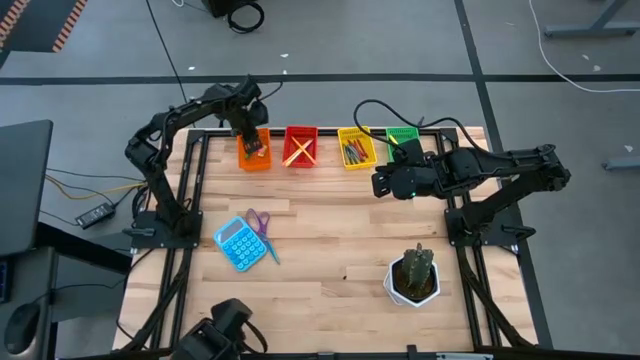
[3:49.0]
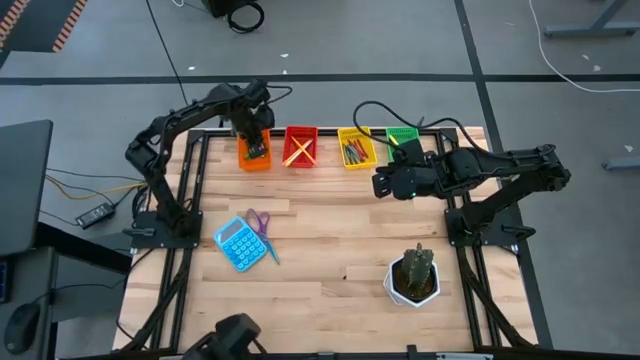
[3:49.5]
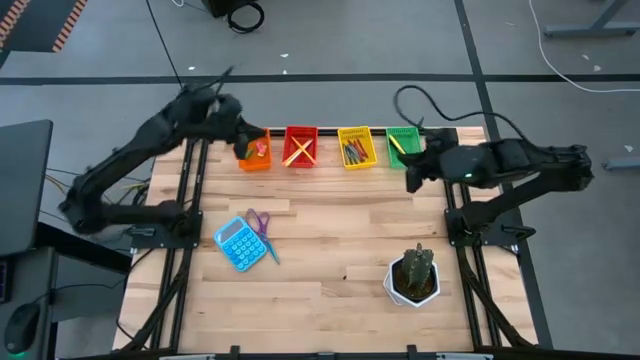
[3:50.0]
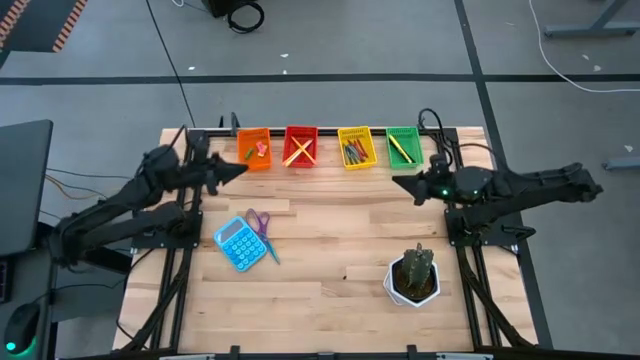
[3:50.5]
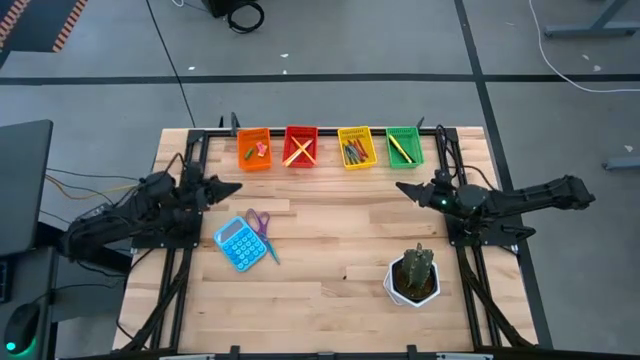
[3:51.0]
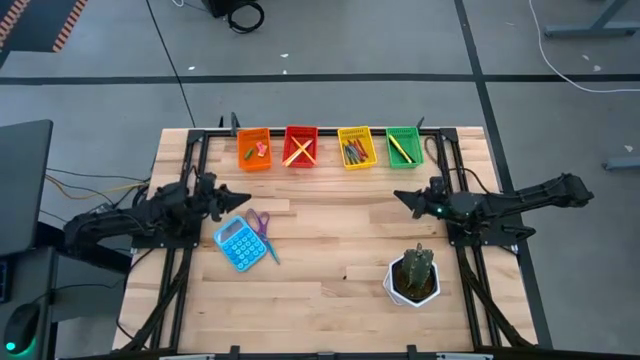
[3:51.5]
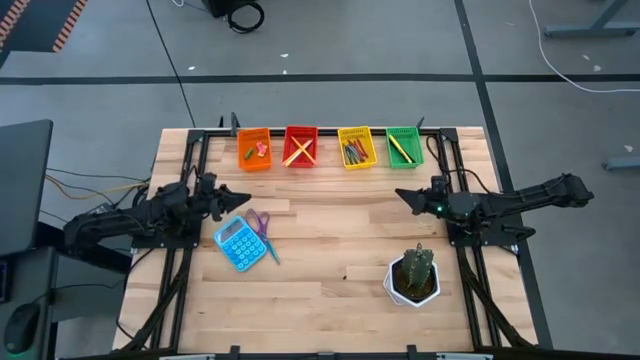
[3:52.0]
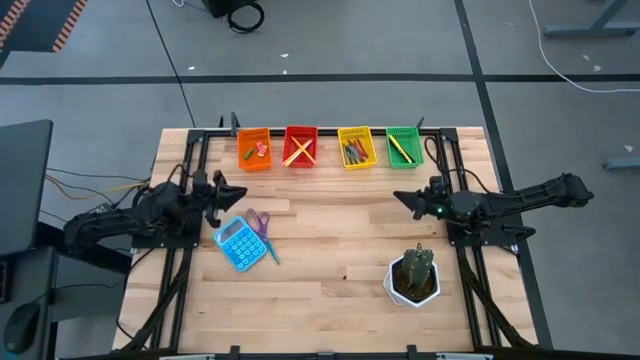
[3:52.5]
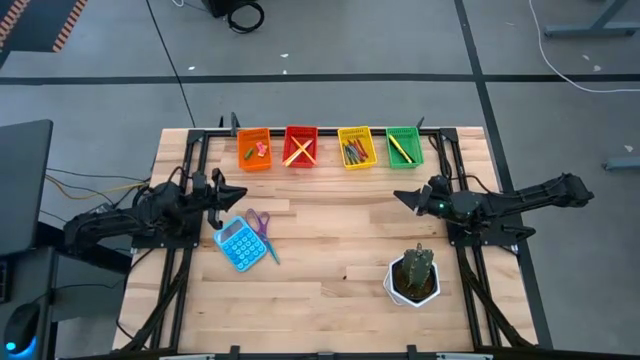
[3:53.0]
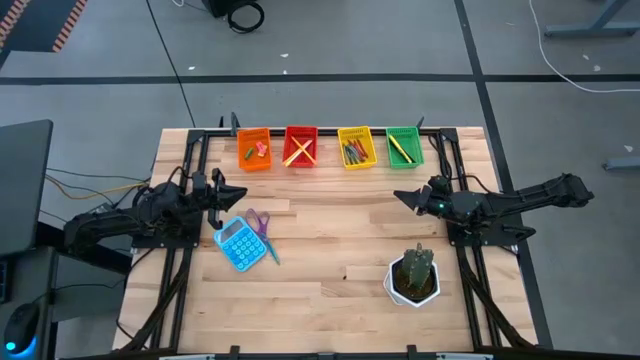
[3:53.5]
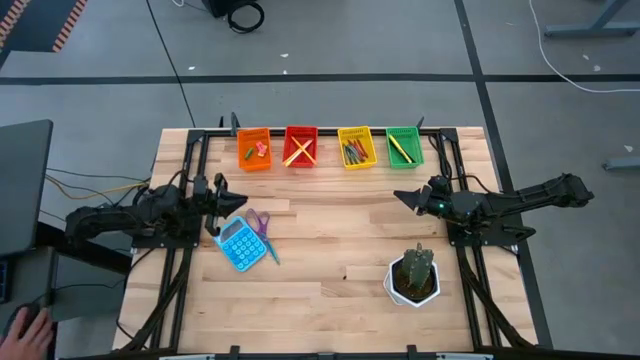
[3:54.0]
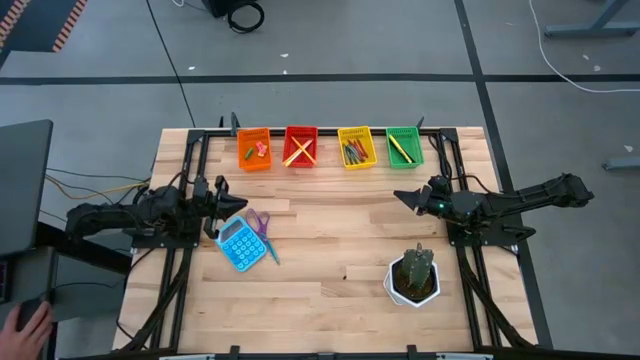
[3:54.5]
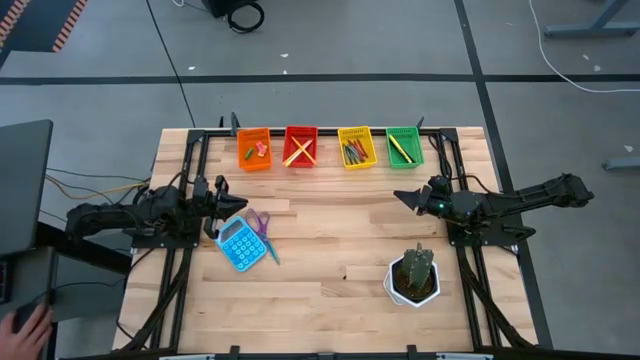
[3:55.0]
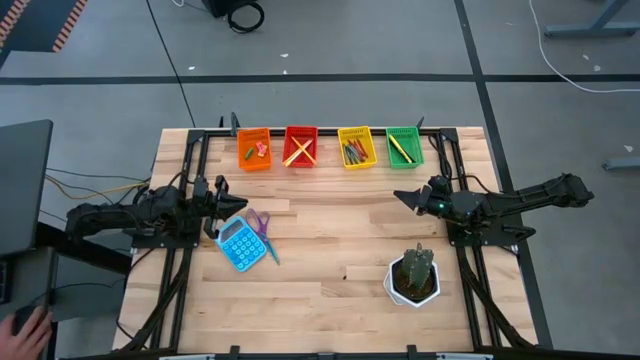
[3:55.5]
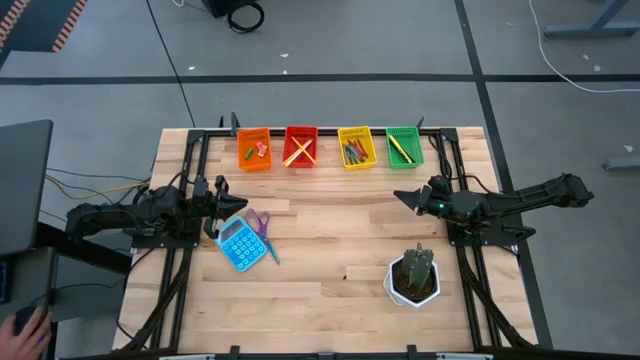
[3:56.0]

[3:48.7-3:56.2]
Task: Sort crayons/erasers/pens/pencils in bins
Return to Home Position

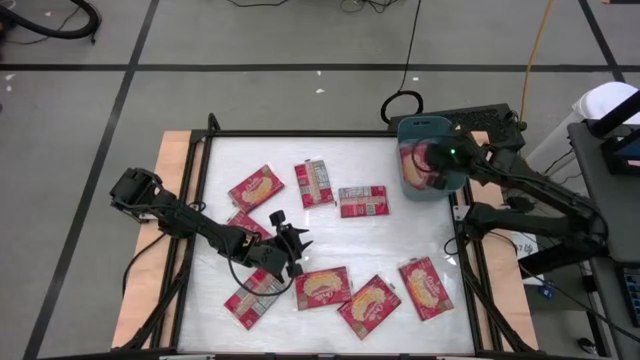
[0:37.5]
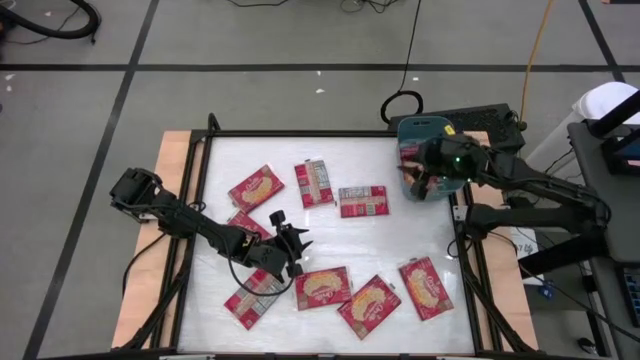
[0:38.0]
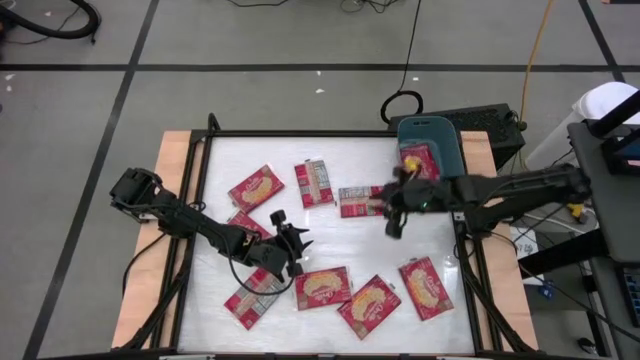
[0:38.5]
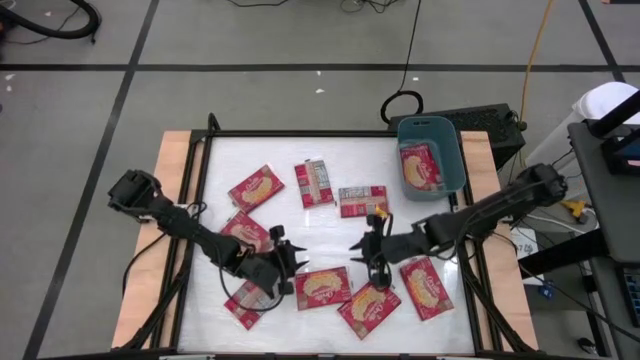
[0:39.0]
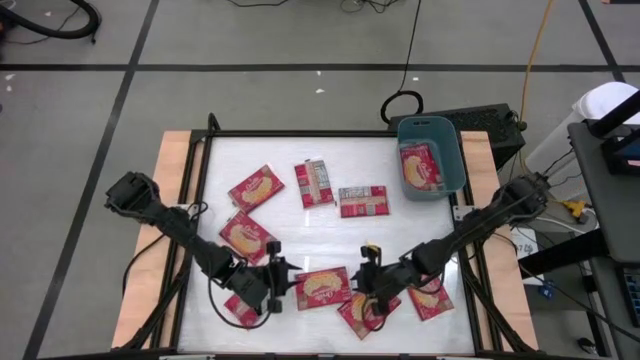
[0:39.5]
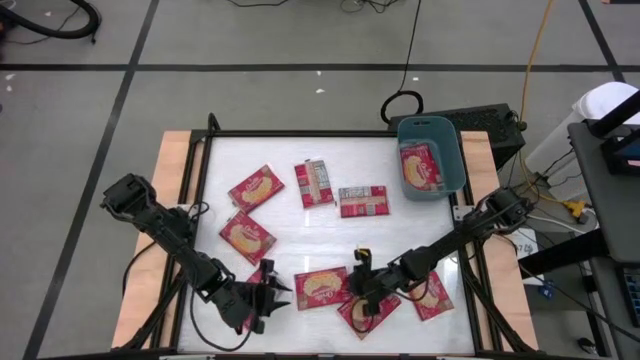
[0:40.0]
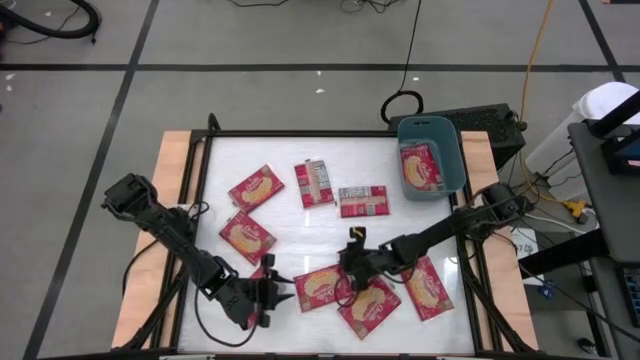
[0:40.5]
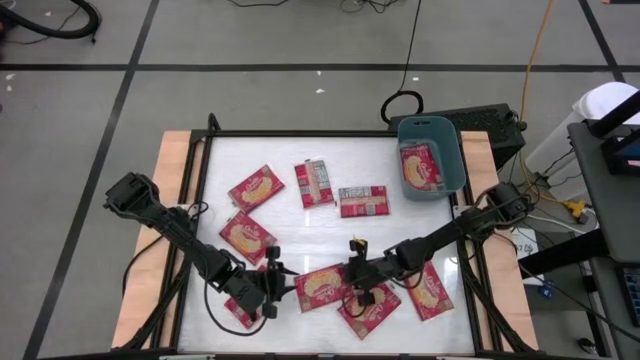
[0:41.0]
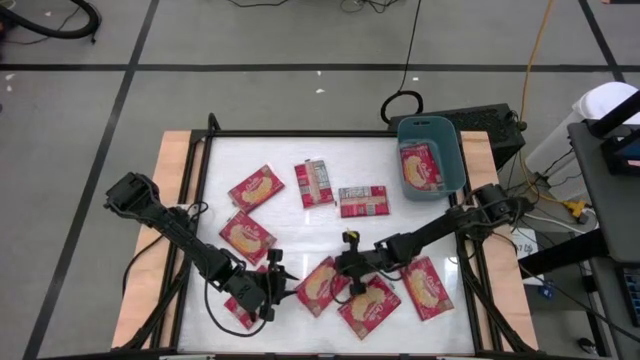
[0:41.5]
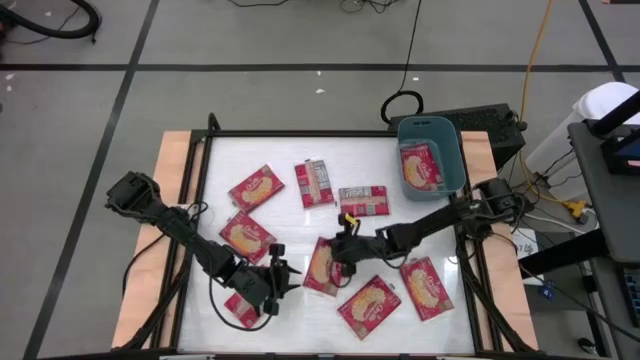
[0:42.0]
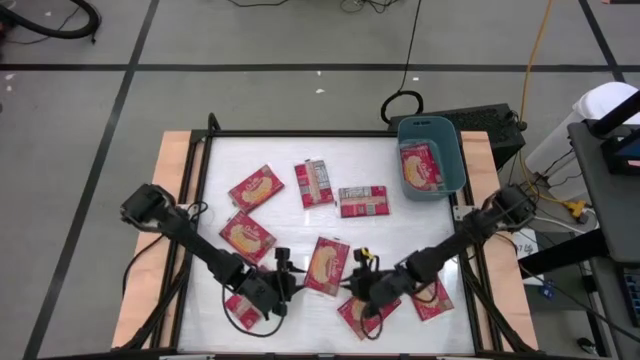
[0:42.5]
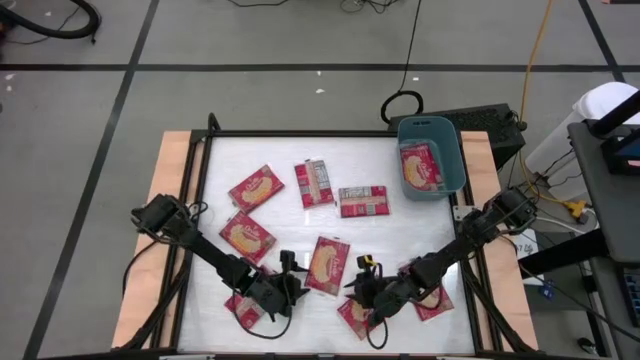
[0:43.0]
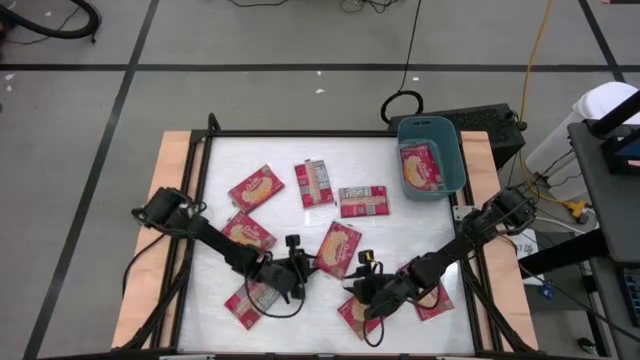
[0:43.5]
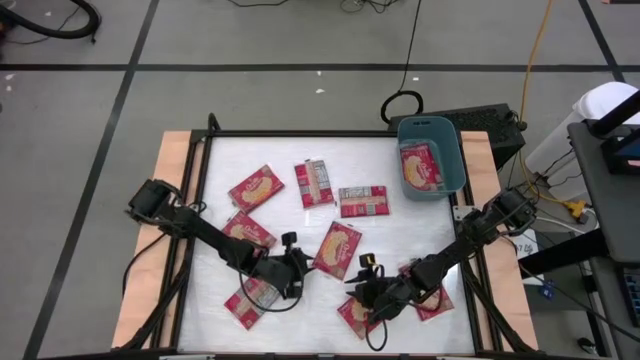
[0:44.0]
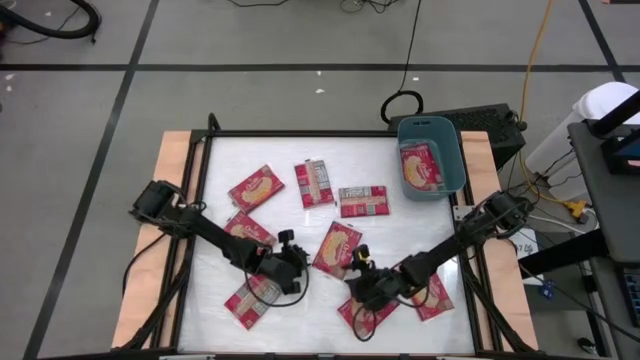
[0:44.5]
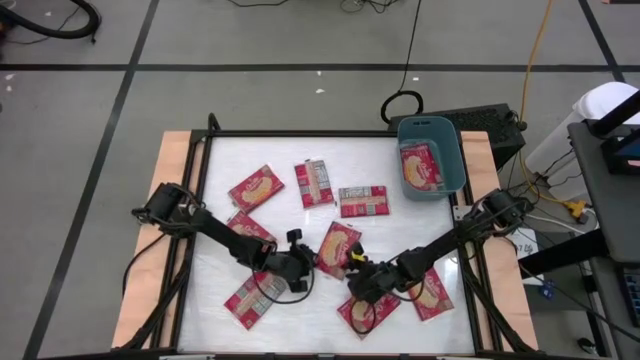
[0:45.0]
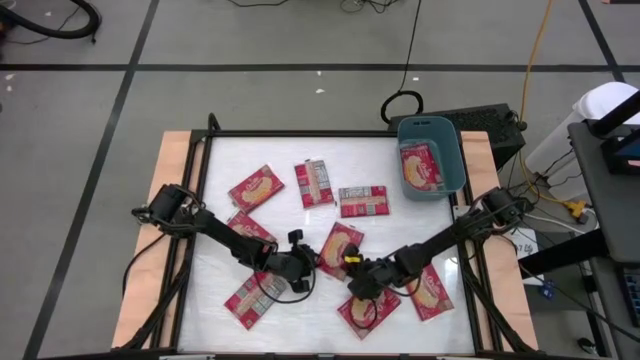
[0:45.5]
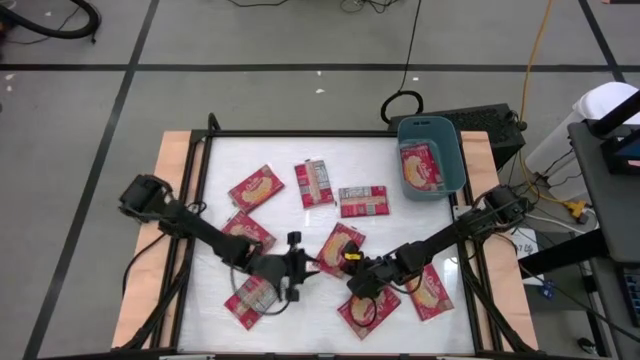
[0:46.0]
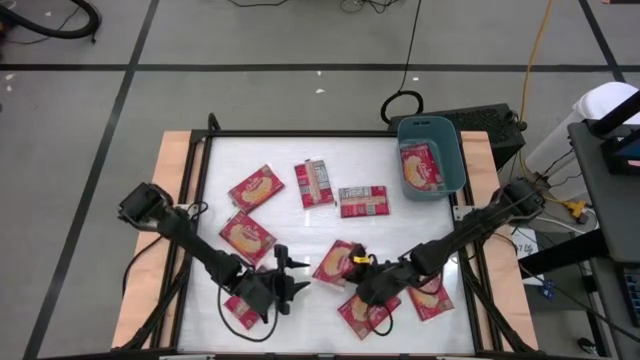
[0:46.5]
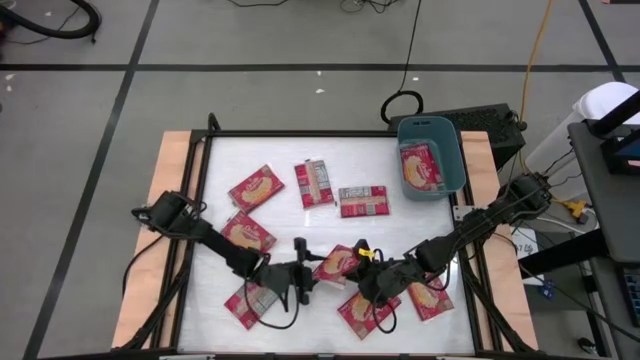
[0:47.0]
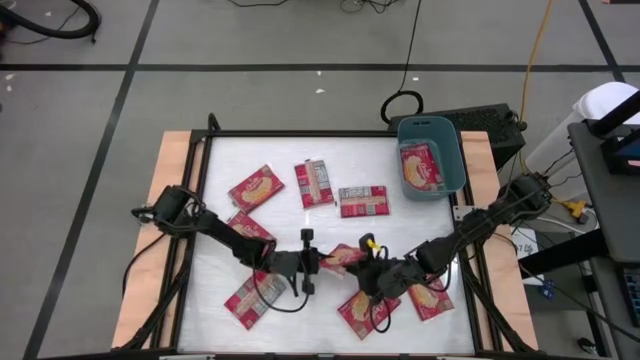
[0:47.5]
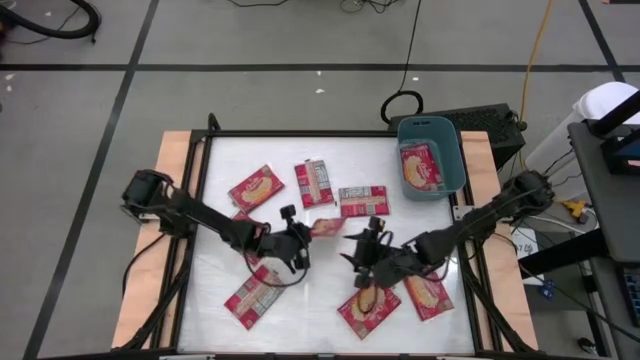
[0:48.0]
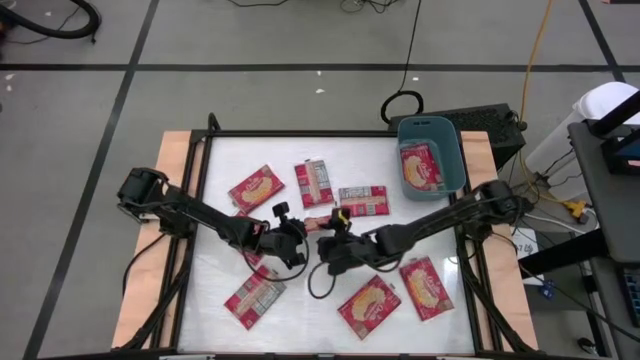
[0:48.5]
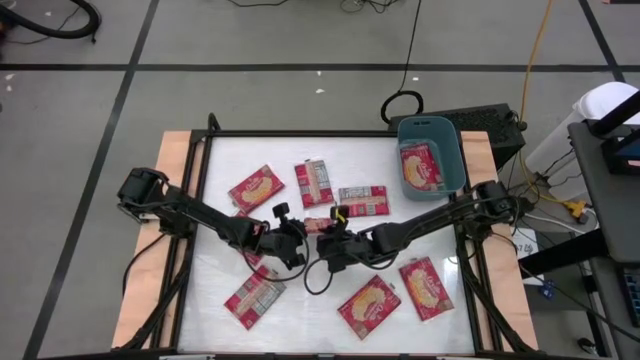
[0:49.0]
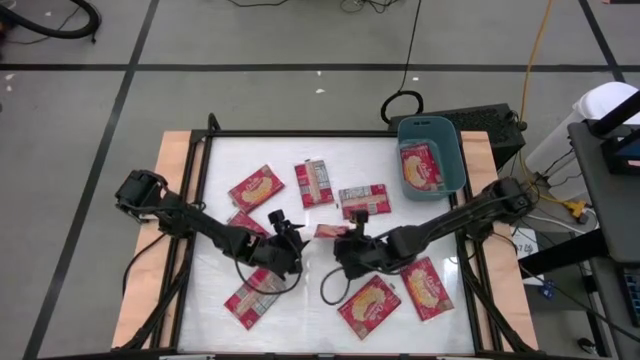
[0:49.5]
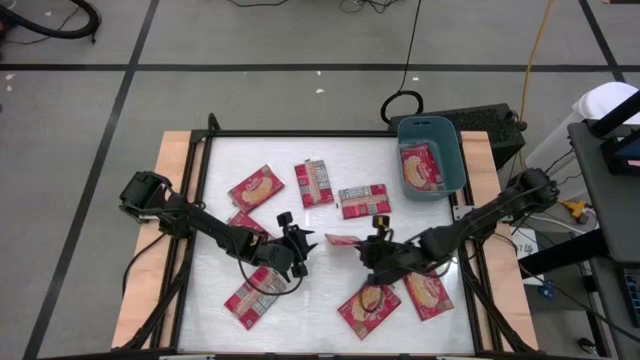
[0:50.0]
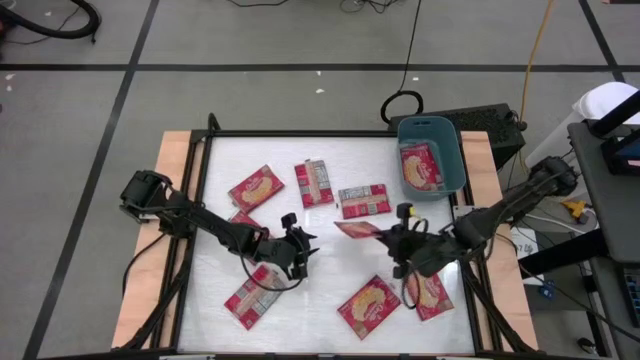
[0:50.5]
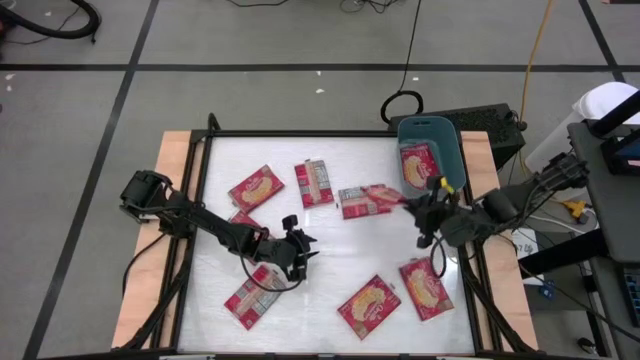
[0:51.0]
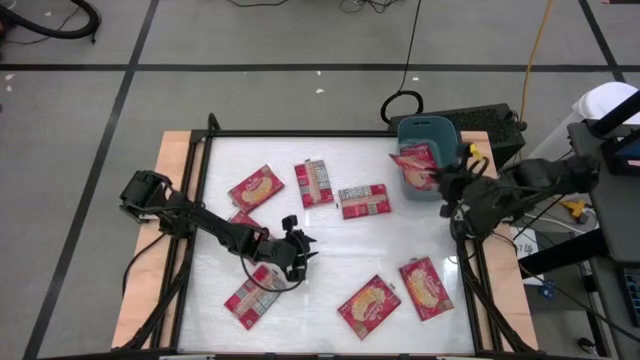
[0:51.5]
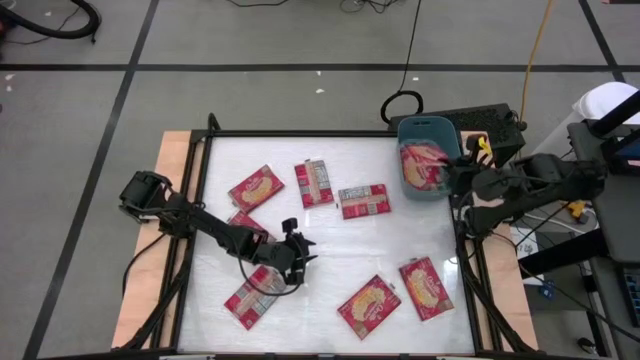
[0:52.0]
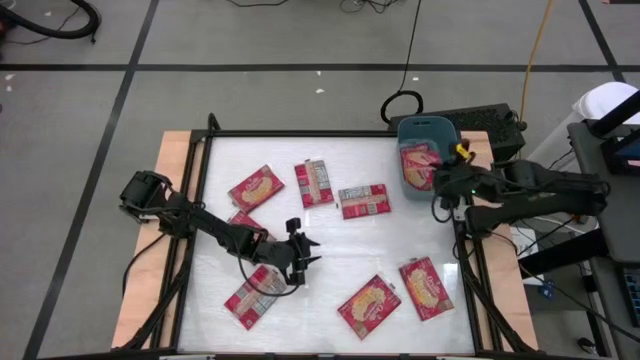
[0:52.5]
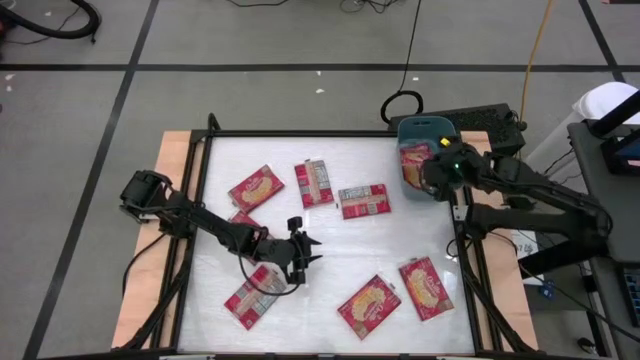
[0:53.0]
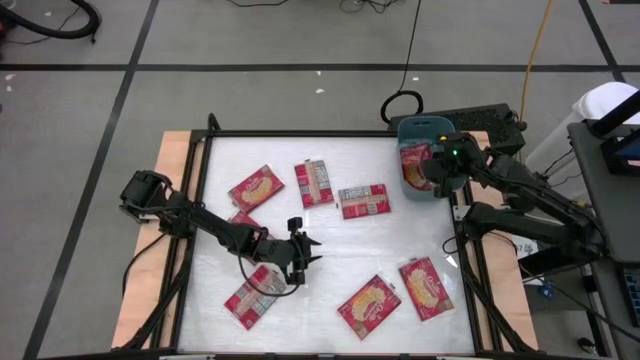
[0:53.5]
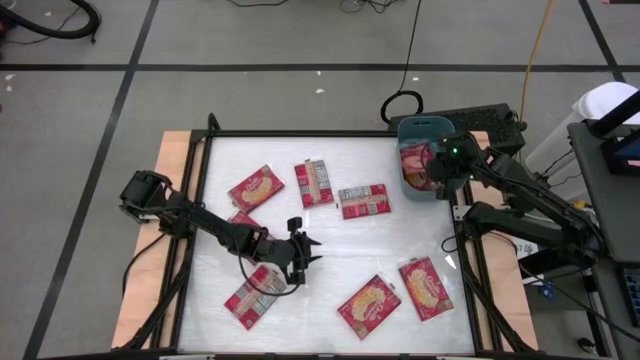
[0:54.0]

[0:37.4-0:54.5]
Task: Sort popcorn bags into baskets
Put the red popcorn bag into the blue bin
